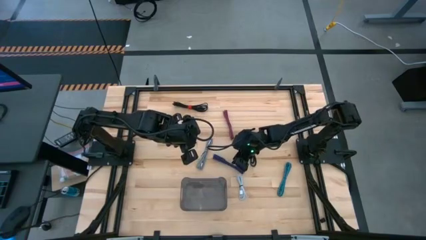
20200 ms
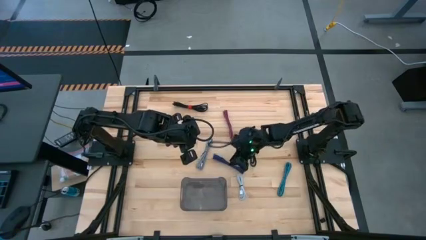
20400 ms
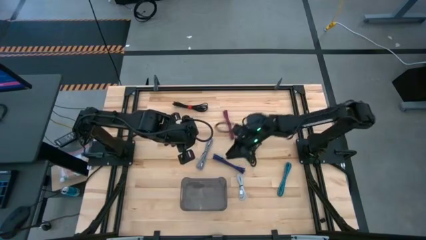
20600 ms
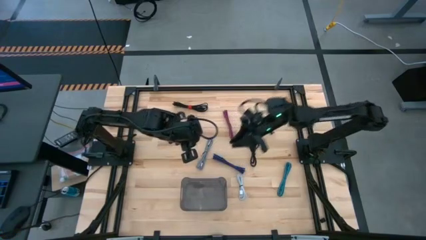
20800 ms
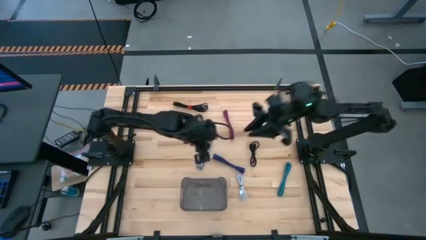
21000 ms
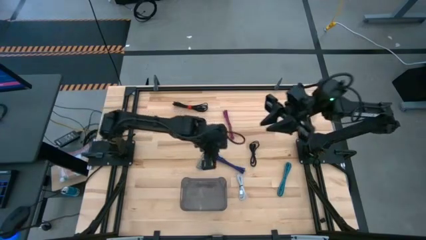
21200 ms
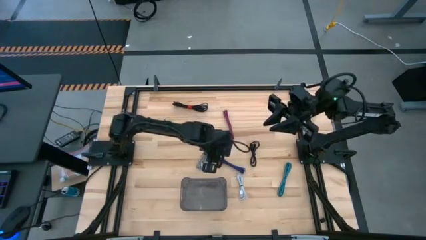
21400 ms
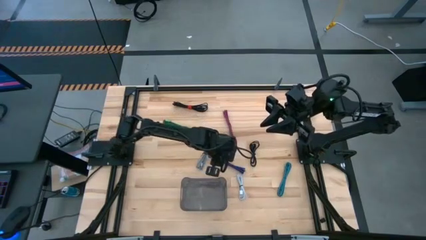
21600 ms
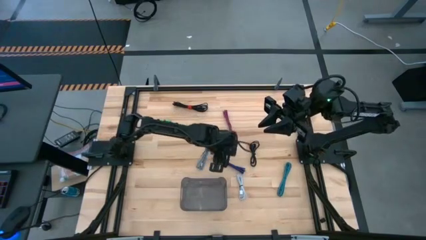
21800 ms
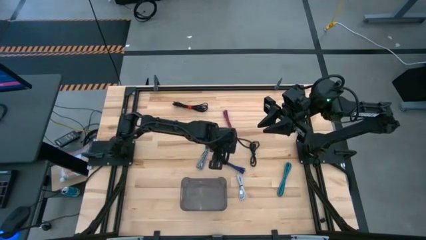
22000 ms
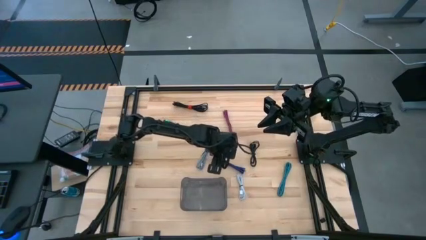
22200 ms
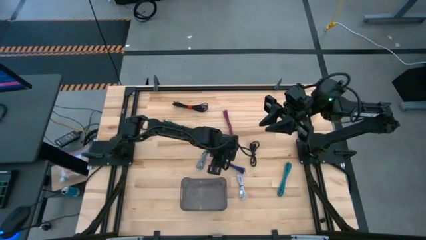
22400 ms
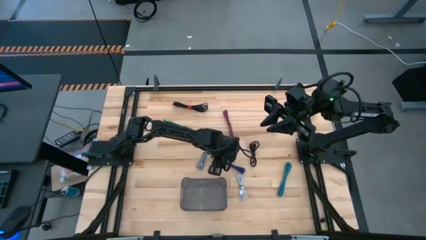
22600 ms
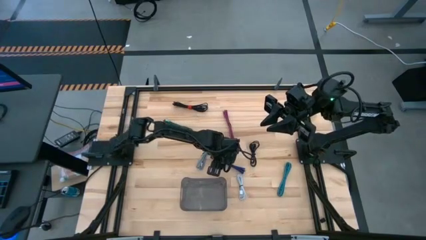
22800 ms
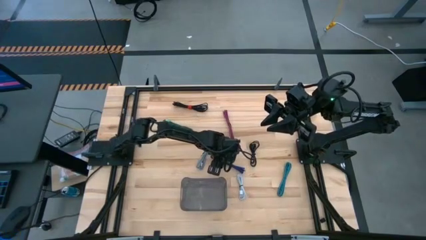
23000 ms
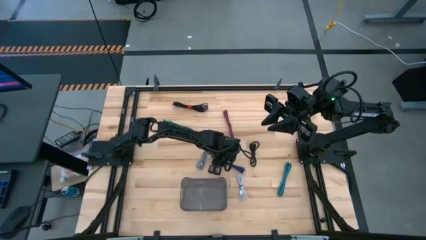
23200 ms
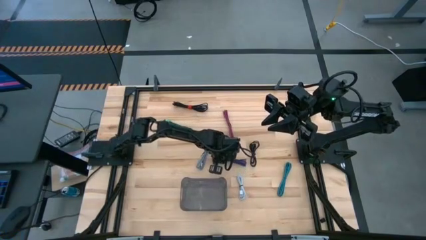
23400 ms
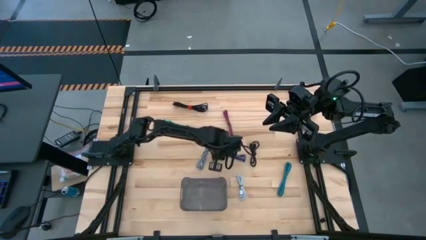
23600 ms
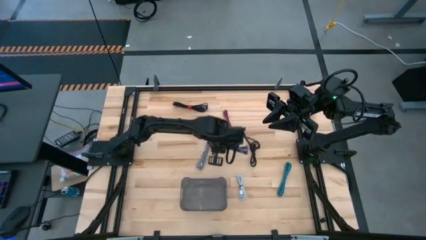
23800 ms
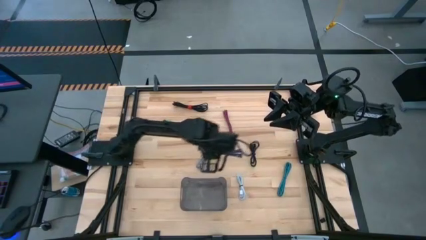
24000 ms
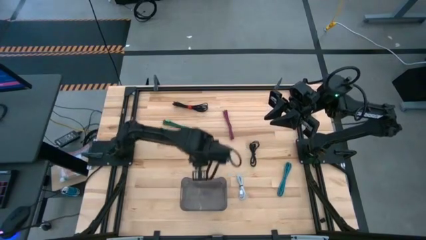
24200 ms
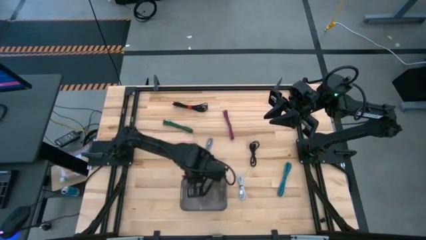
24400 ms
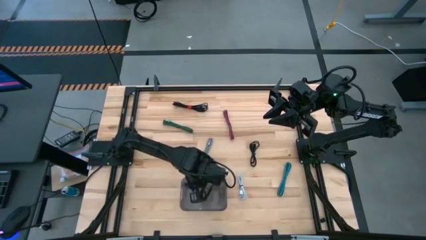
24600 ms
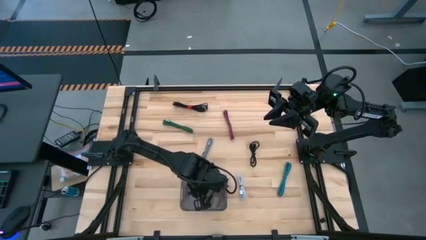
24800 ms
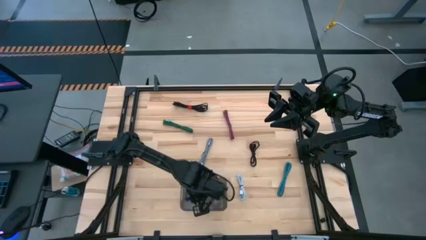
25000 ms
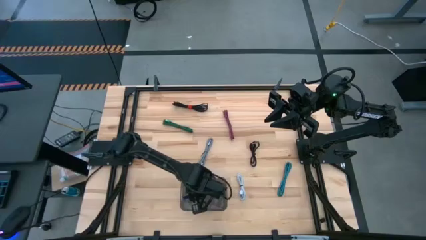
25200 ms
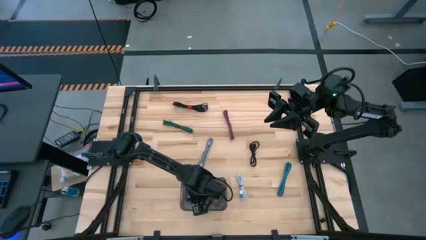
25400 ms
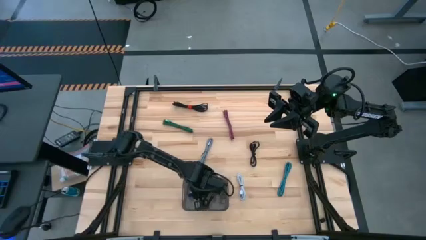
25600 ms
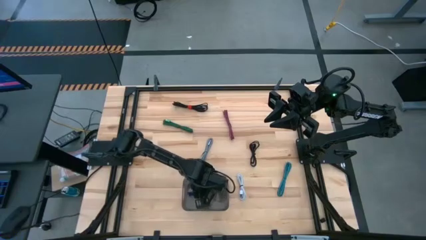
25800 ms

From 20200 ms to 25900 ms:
Task: Pick and place USB-C Cables
Put the violet charger cable into the black bin

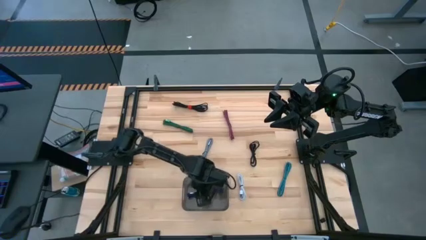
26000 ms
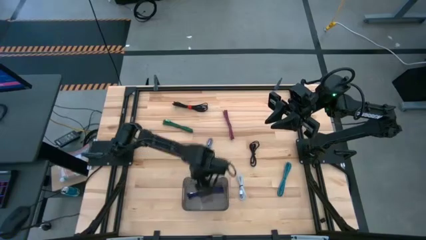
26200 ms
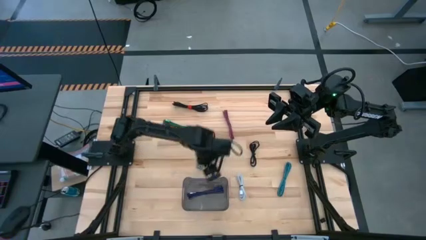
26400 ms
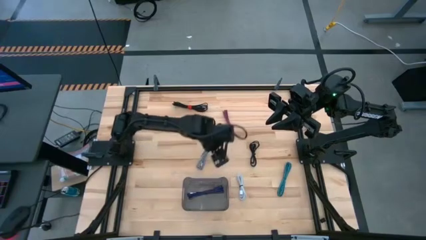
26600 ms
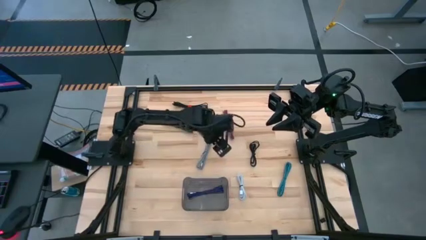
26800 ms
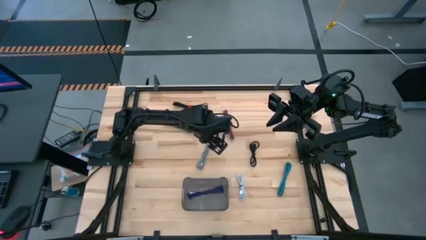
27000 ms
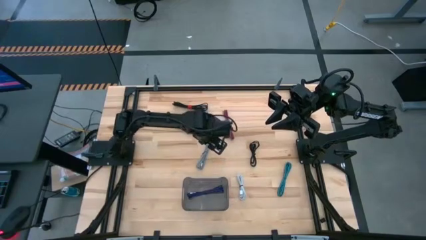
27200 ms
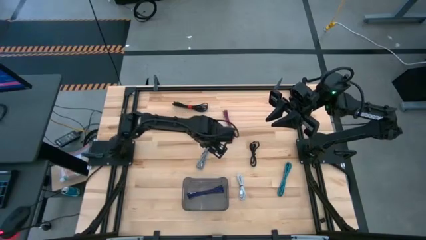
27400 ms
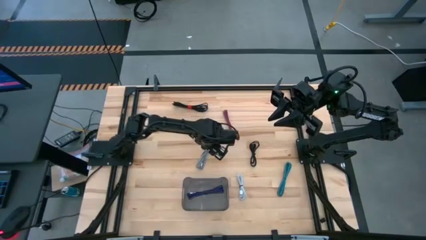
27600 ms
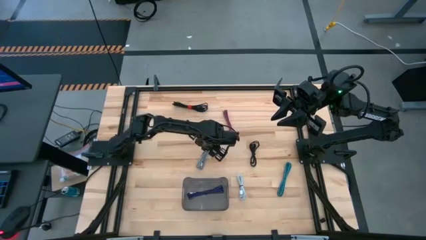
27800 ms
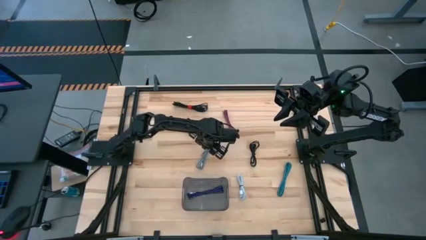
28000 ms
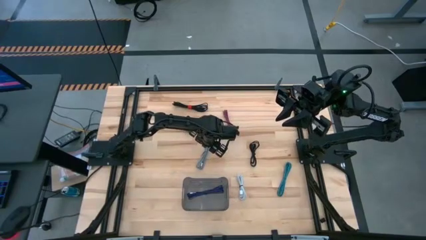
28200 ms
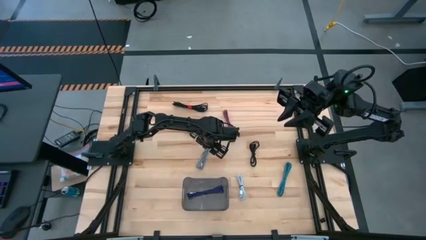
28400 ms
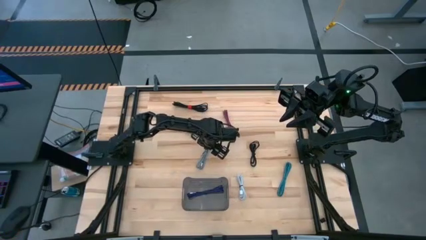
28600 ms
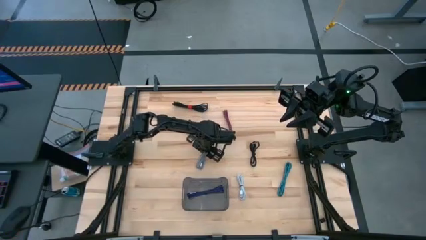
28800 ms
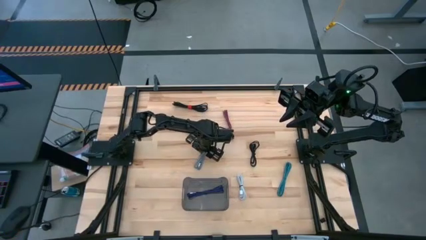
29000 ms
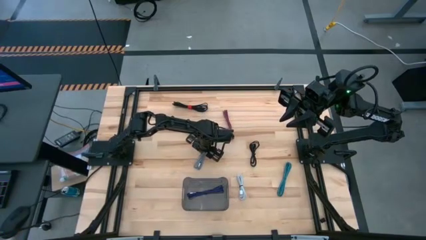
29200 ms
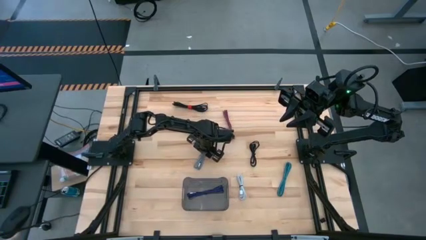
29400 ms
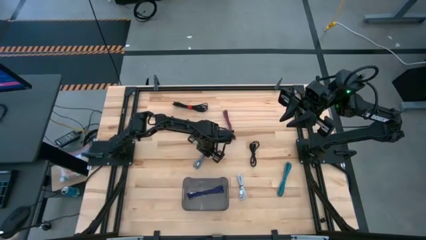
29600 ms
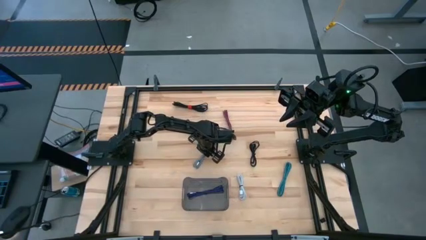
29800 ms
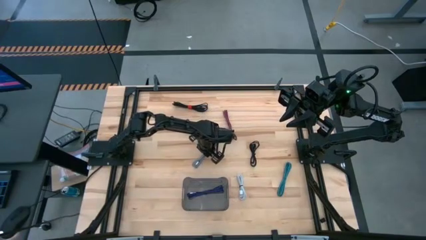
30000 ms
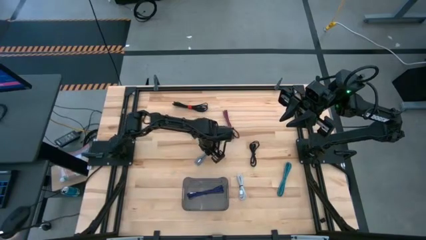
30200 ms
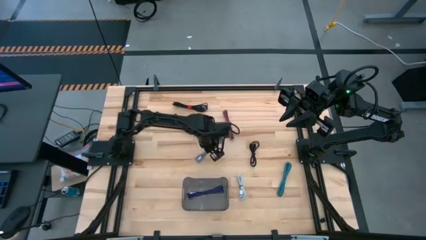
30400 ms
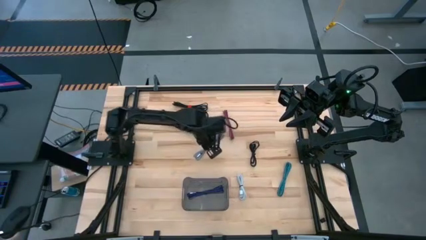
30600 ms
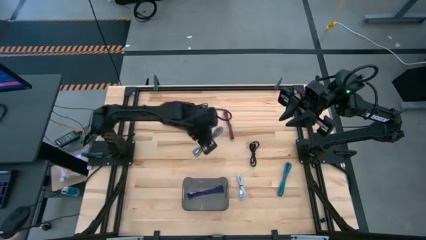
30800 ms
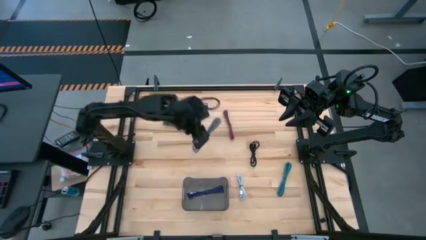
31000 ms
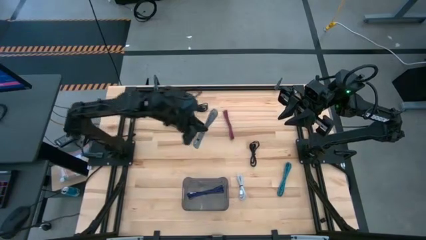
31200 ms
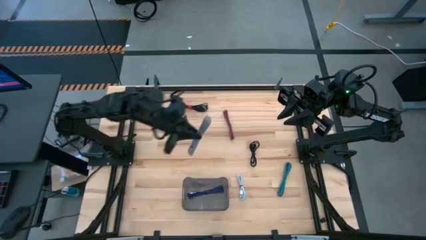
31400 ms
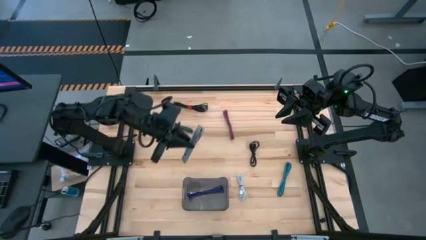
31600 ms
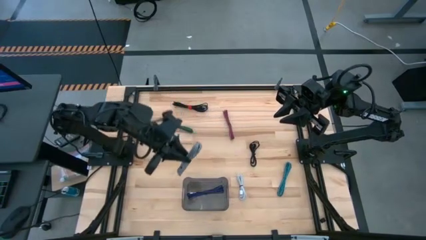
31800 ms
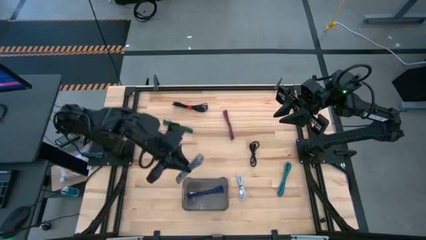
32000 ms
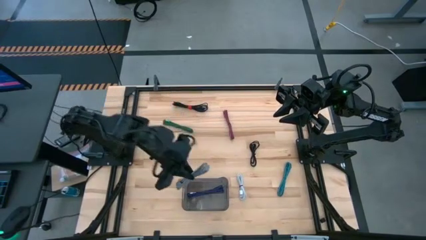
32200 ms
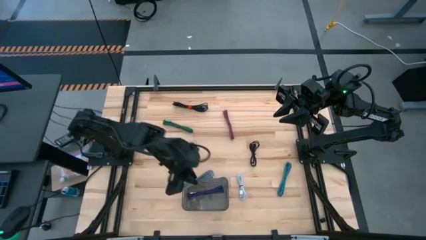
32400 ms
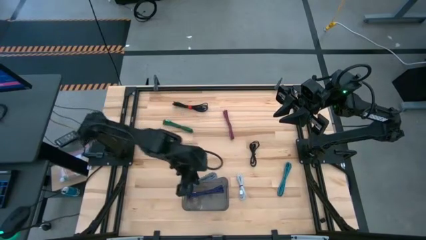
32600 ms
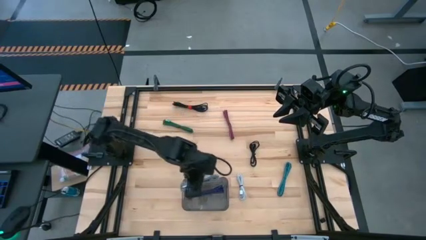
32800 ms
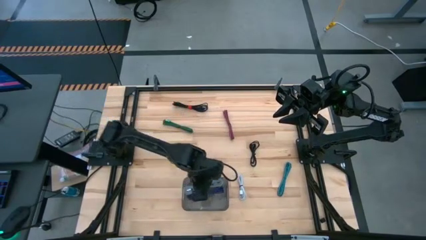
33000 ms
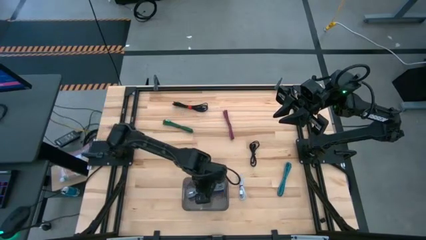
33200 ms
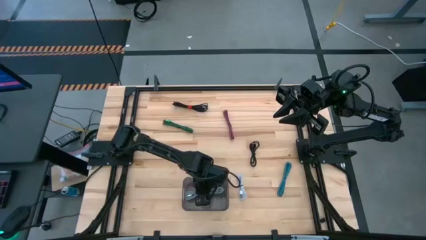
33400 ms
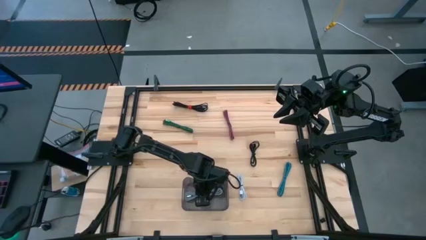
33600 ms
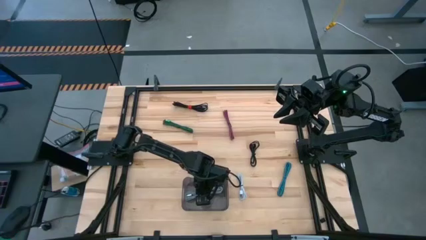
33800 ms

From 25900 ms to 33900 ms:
Put the gray charger cable into the black bin

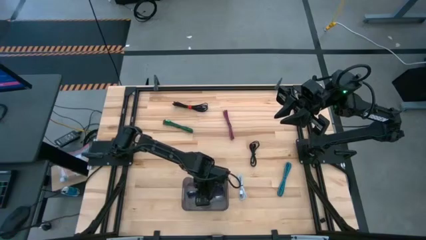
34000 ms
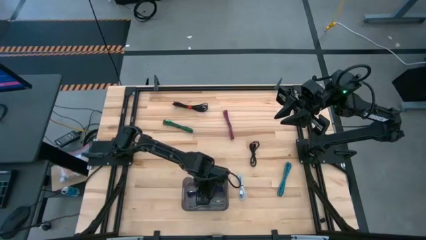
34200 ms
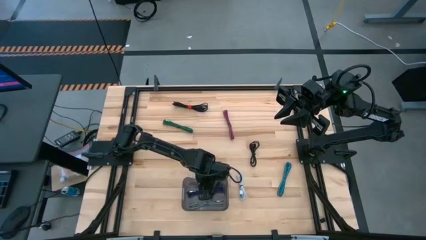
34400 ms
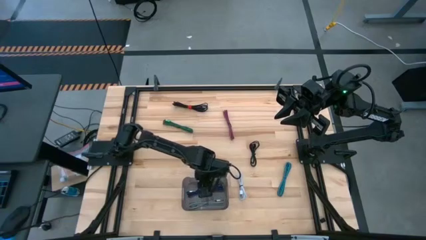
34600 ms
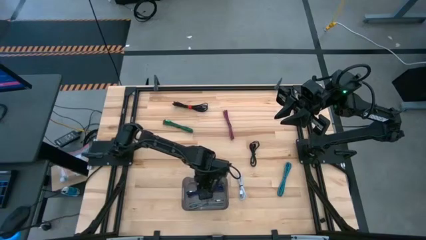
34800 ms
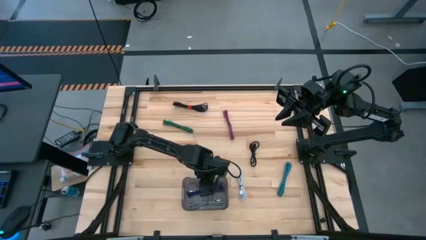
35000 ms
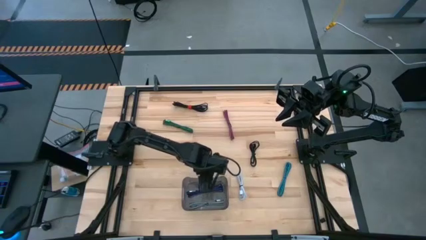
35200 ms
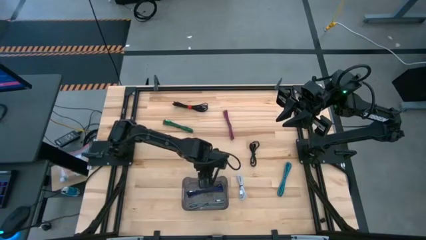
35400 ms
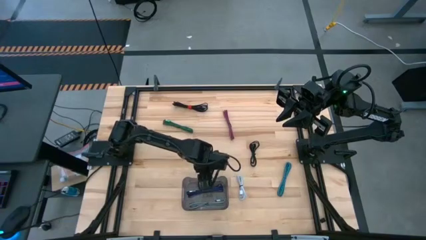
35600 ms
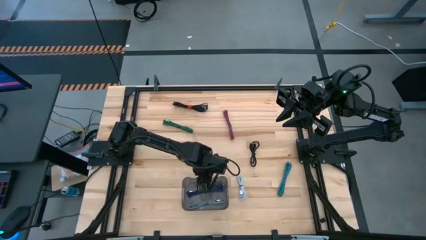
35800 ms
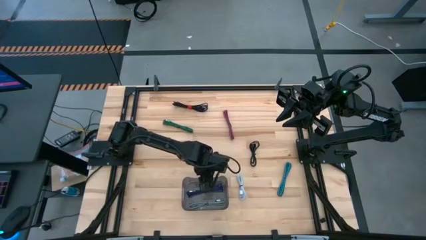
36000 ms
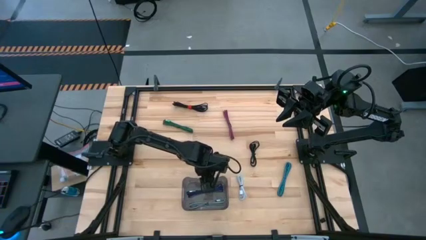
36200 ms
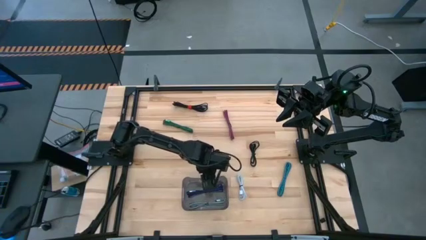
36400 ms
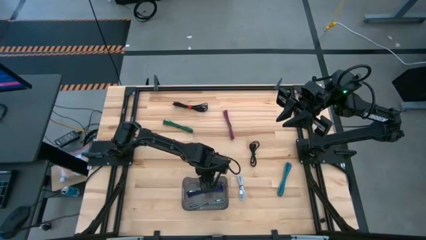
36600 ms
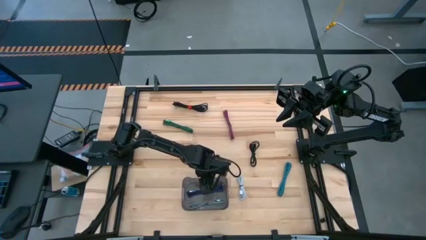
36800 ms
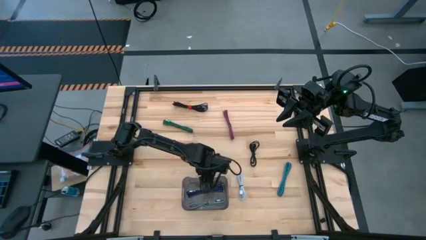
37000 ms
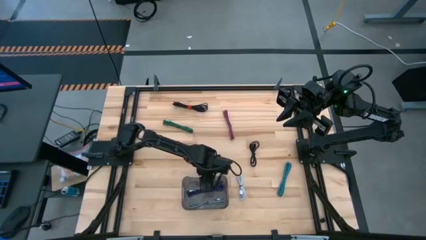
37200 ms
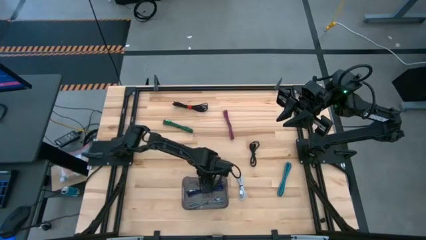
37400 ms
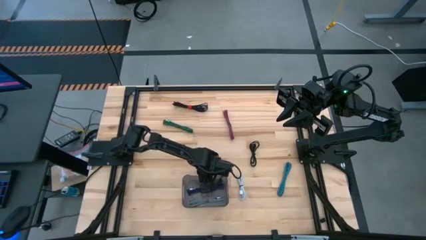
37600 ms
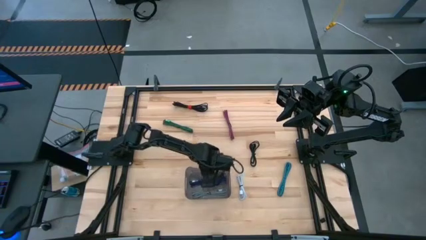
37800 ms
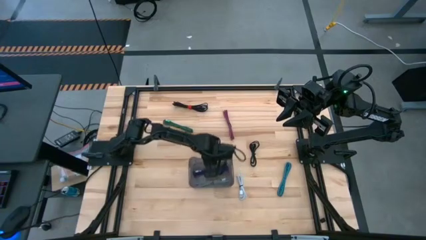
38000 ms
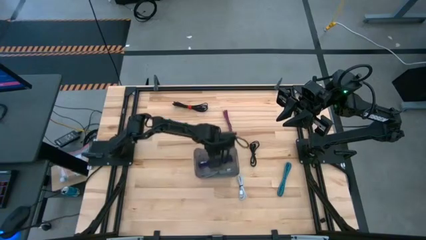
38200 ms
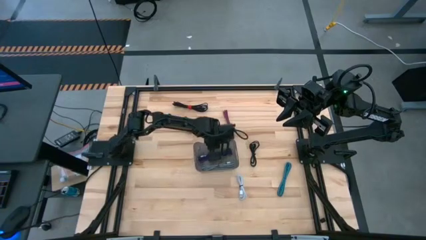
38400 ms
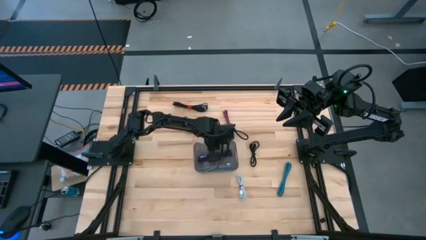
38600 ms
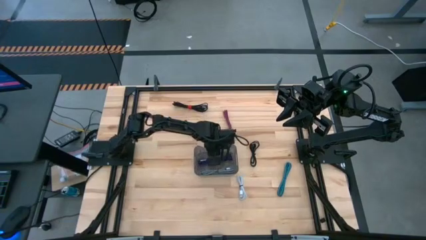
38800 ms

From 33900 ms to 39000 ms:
Move the black bin to the center of the table
